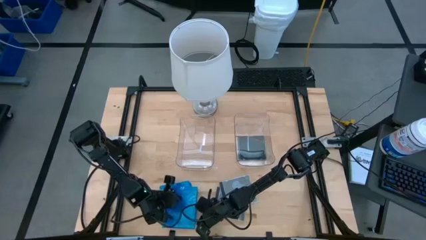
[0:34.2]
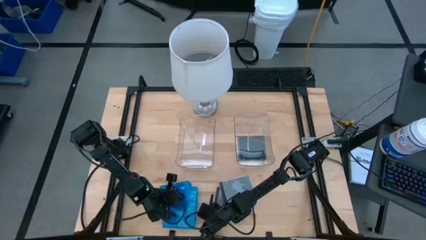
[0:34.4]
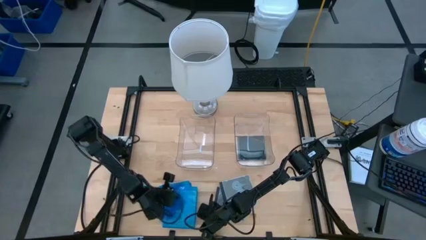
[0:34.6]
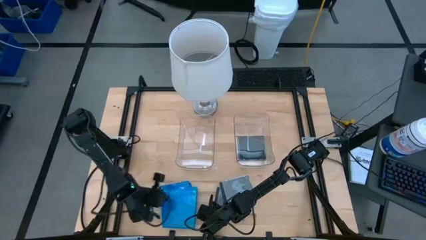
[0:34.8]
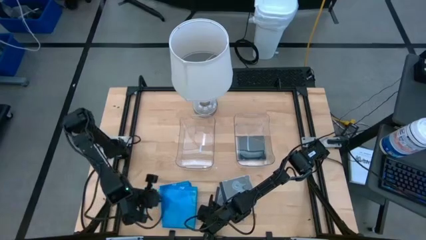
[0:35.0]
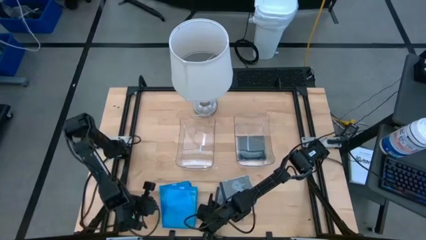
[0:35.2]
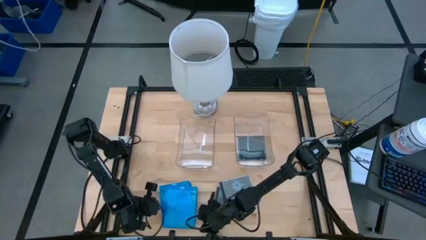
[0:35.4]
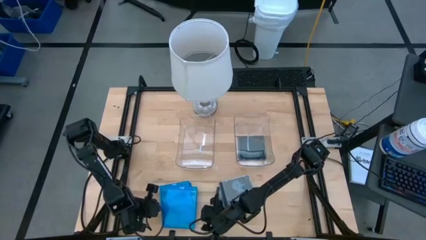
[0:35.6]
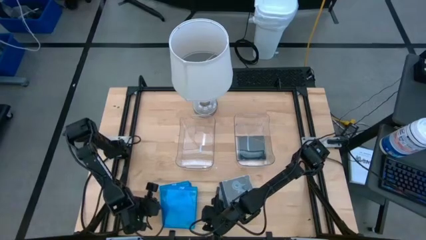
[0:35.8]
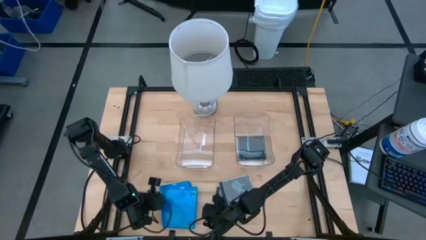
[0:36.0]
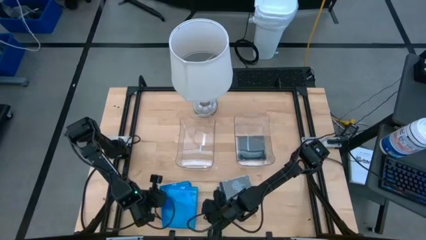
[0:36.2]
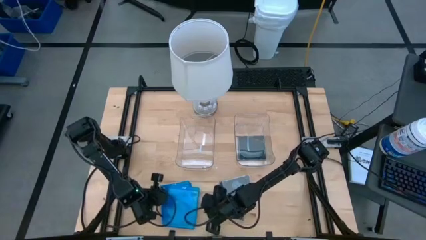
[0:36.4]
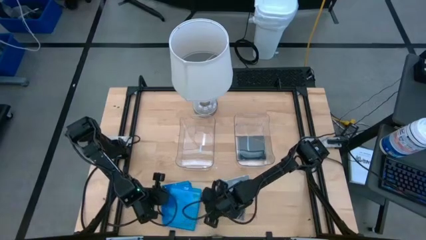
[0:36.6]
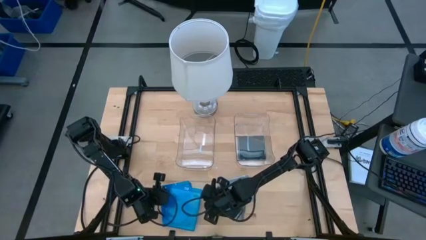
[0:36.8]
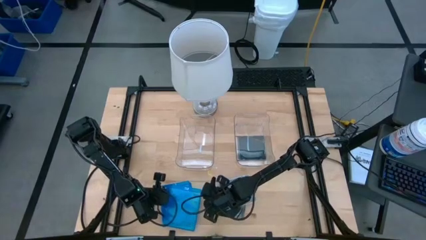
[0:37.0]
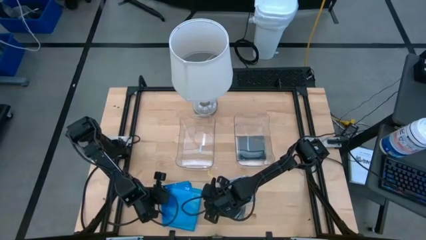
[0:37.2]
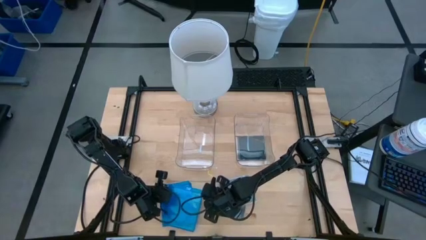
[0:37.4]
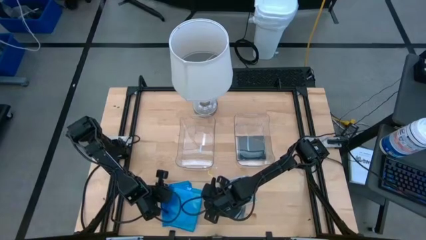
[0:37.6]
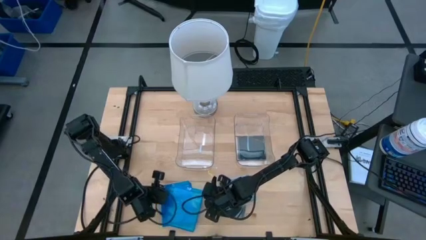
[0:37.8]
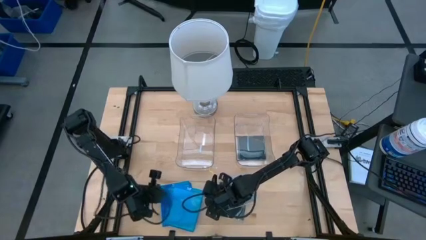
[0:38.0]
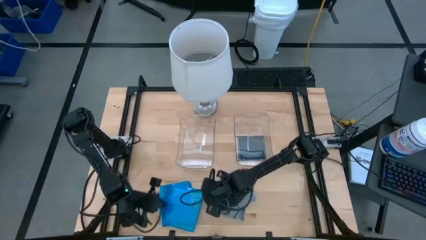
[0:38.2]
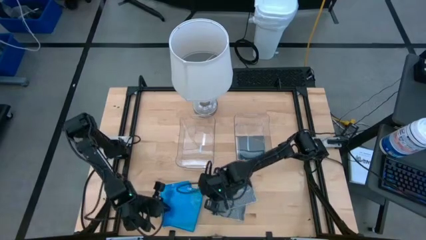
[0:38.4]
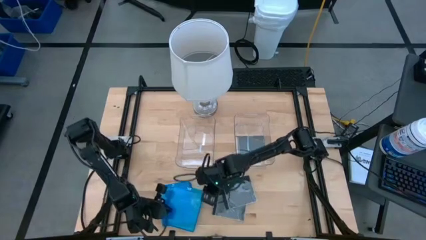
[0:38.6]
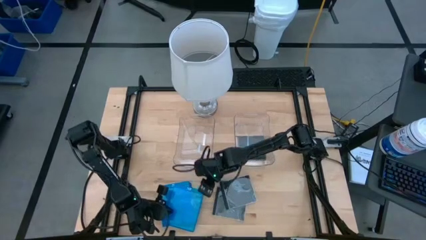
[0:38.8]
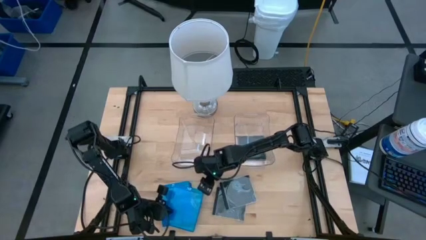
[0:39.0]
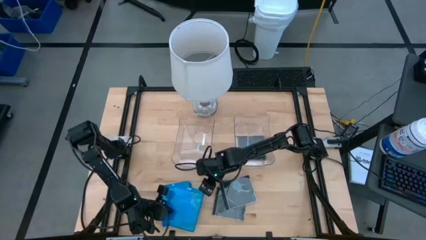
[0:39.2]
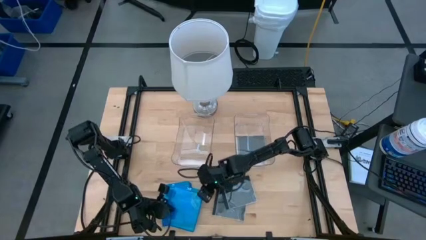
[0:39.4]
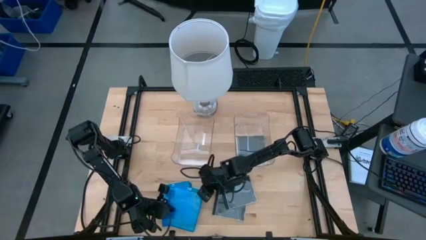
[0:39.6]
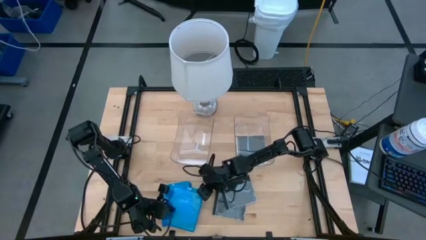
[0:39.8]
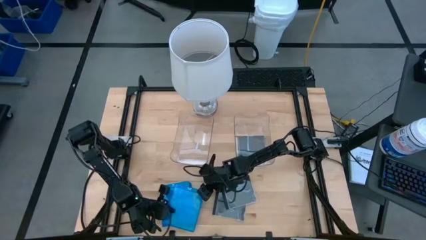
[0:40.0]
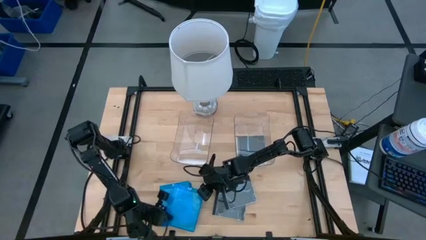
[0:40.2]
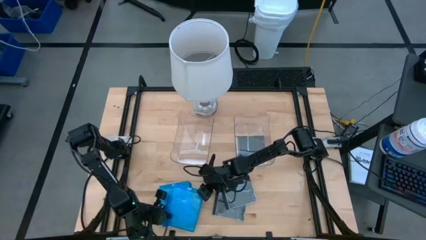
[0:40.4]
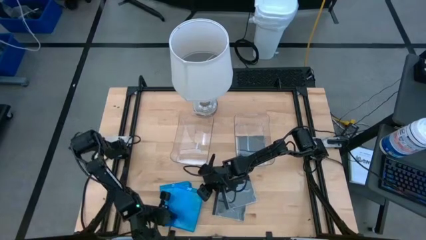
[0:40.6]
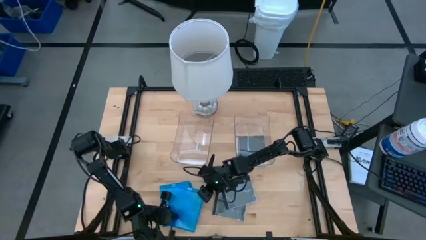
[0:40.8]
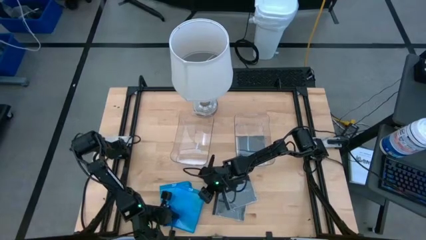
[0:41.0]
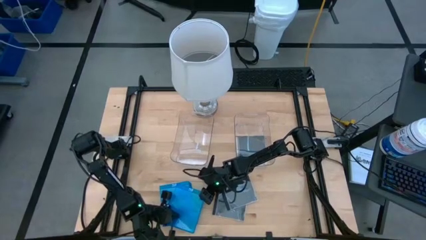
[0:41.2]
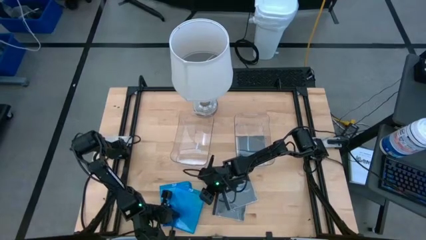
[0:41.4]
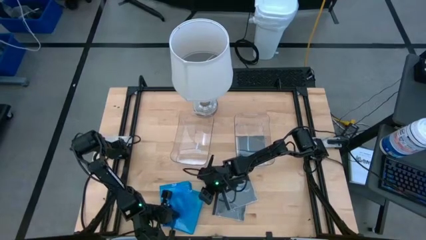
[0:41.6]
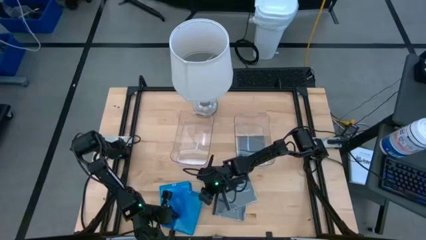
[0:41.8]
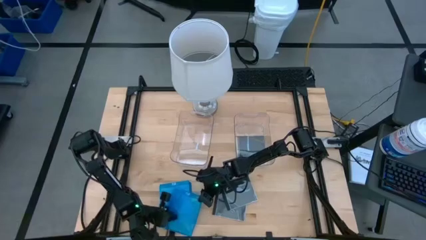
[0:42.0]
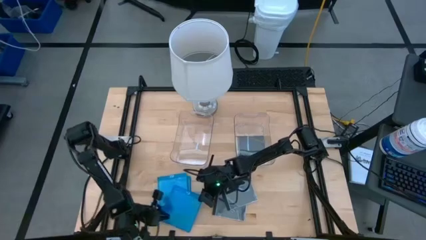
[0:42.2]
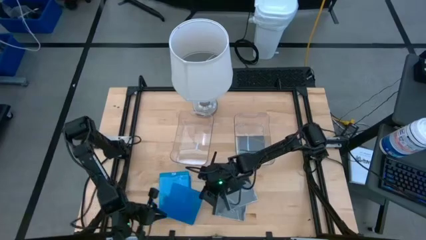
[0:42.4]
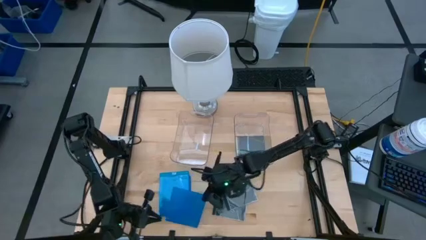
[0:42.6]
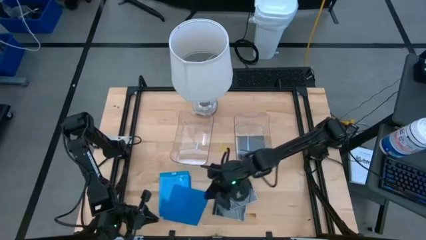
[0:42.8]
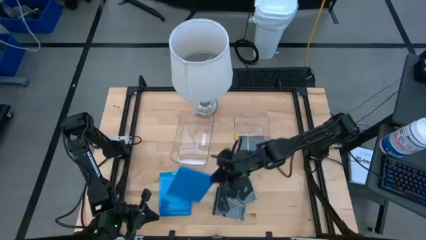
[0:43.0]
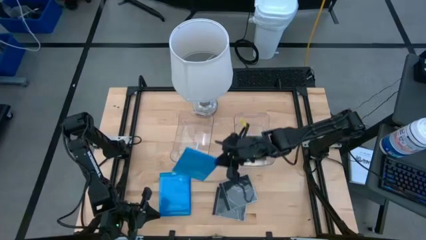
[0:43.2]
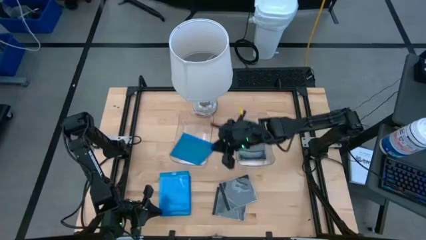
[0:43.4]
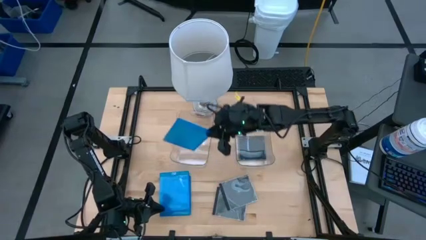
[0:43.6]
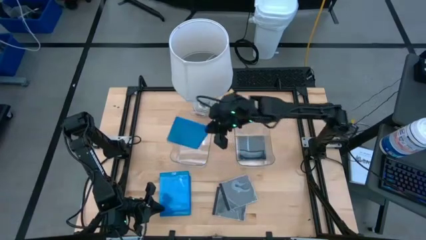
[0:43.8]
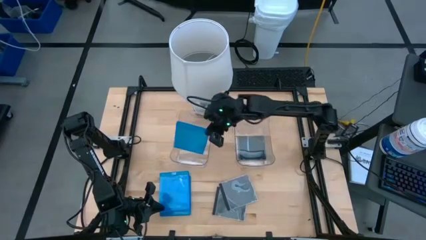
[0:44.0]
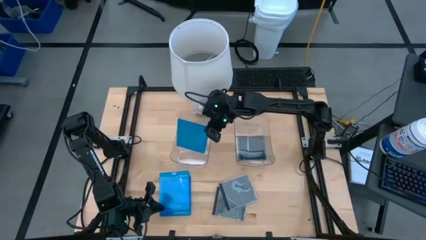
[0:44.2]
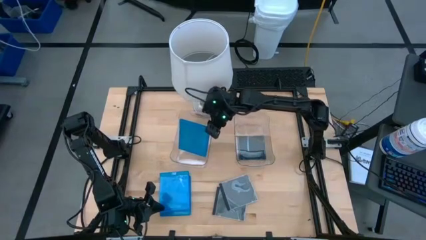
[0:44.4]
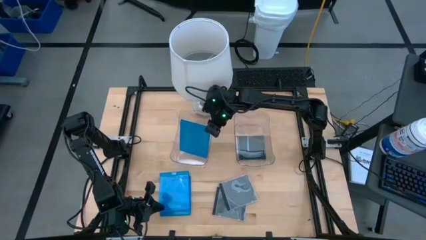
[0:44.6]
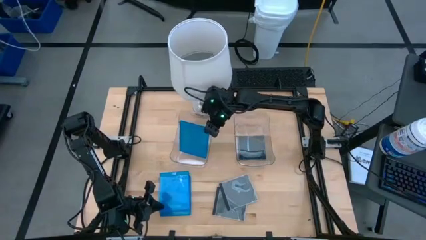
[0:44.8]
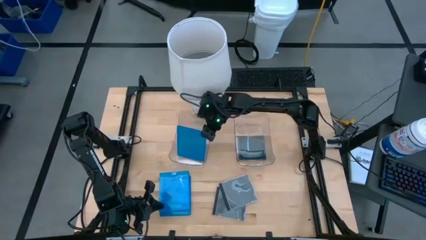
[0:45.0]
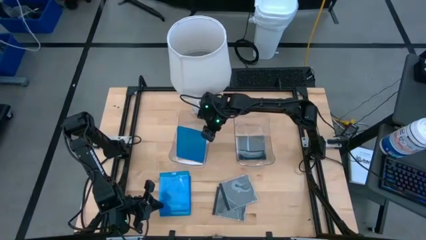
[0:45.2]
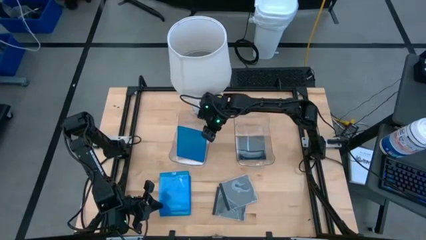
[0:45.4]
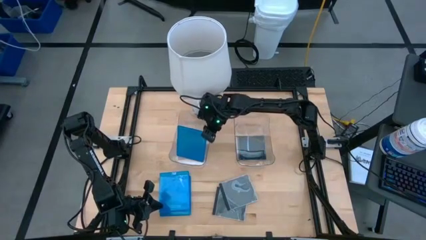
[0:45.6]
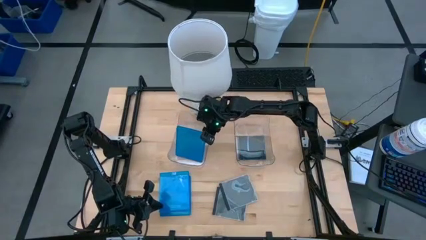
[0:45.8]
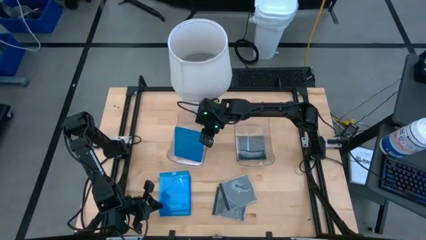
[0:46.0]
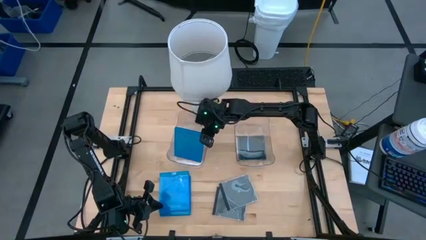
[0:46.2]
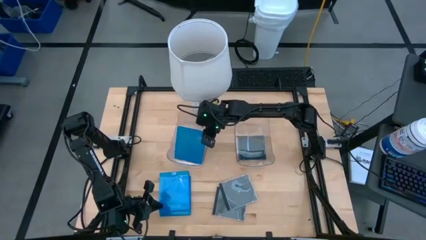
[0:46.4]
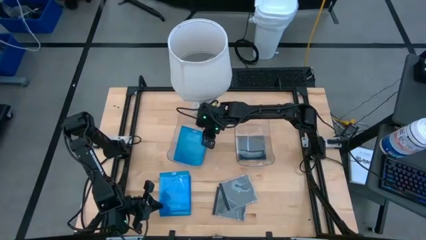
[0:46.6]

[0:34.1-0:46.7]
Task: Pick & place jewel cases by type
Put the blue CD case into the left transparent bin

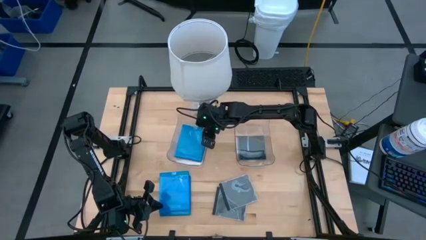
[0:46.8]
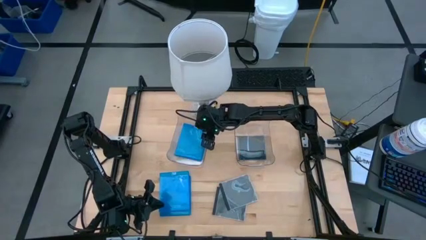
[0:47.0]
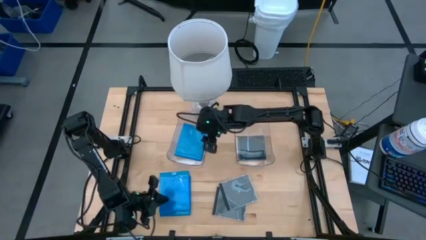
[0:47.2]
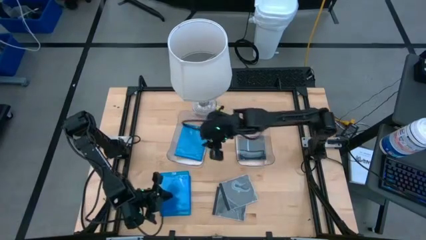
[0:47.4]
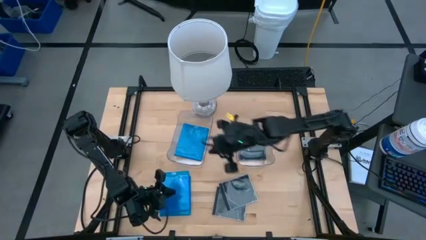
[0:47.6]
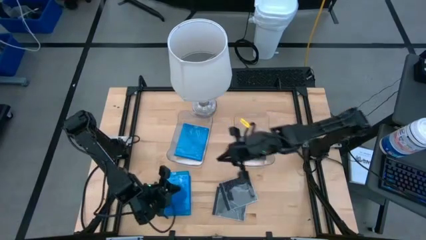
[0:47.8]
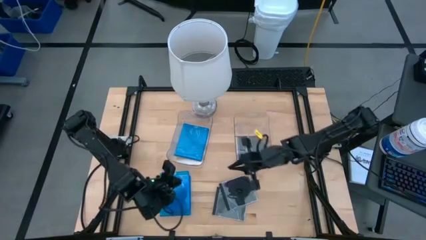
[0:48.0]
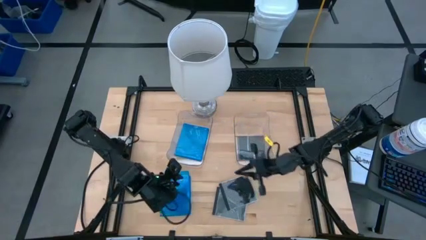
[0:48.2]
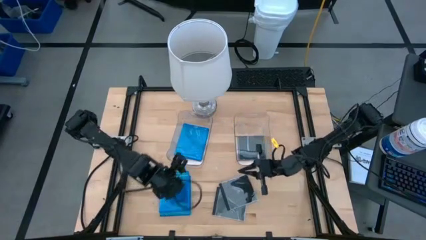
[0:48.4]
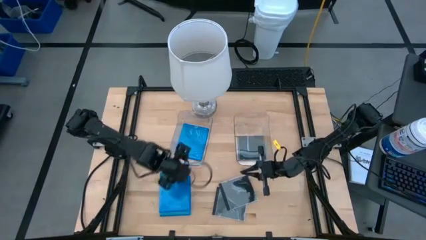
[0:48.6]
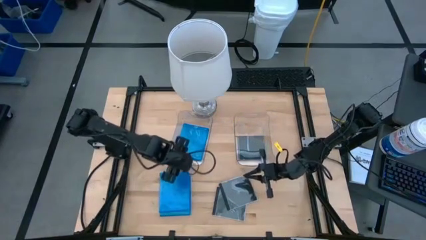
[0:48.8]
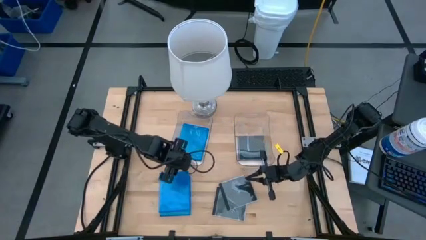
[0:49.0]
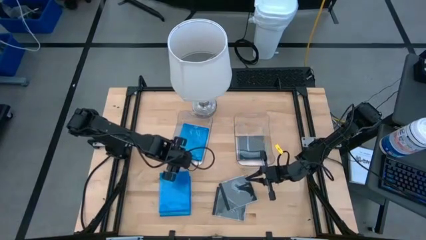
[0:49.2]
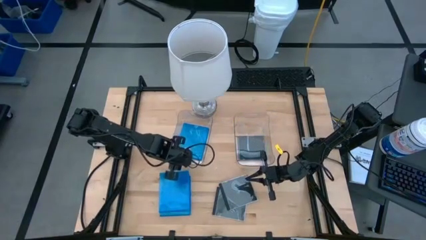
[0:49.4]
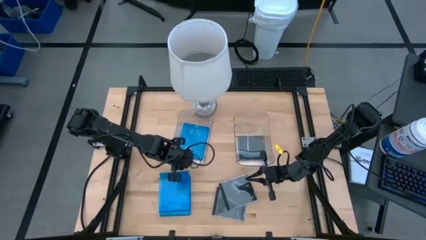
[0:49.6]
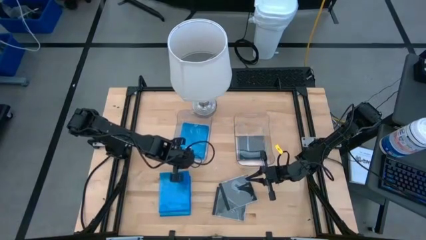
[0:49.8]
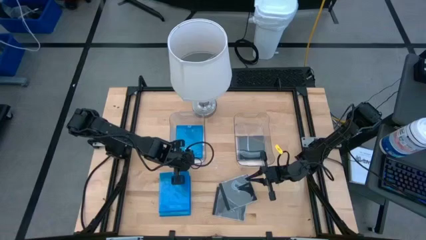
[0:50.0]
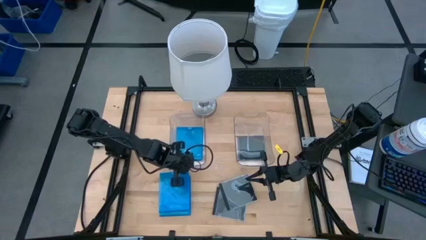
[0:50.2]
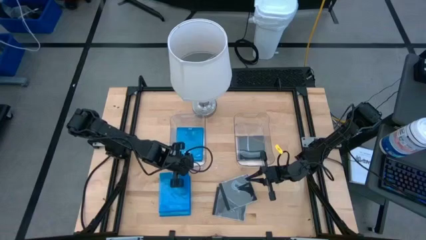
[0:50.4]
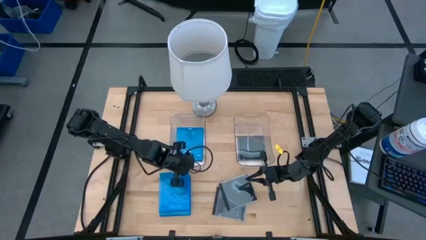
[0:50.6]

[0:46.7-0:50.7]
Adjust the left transparent bin on the table
